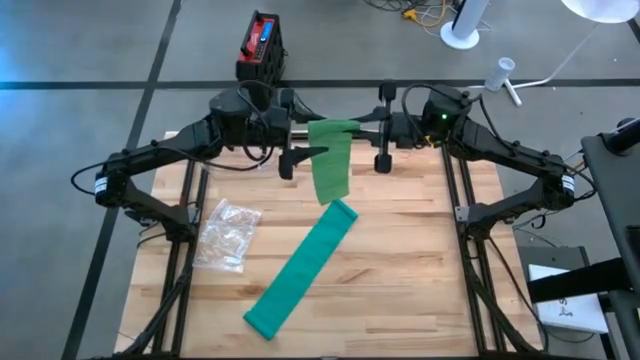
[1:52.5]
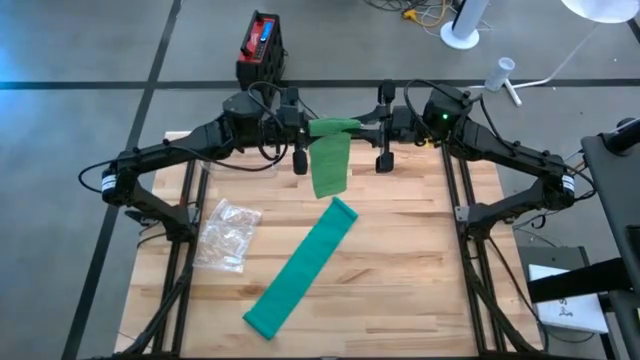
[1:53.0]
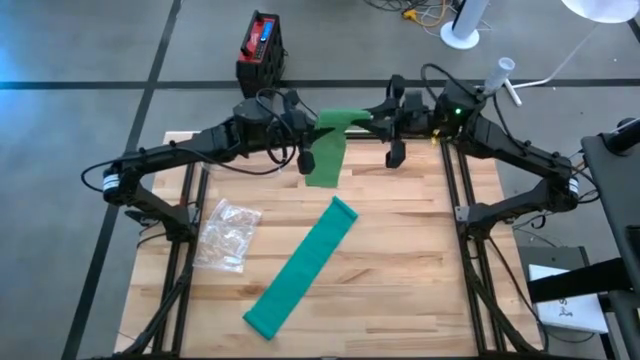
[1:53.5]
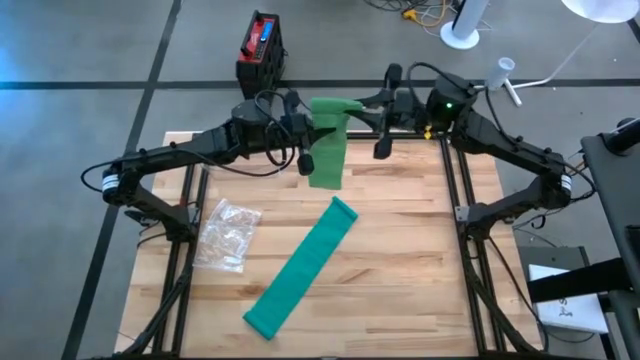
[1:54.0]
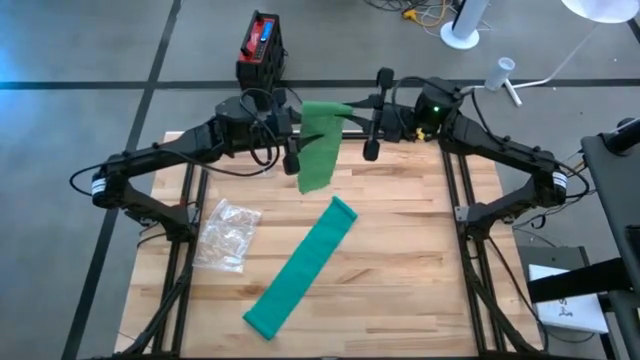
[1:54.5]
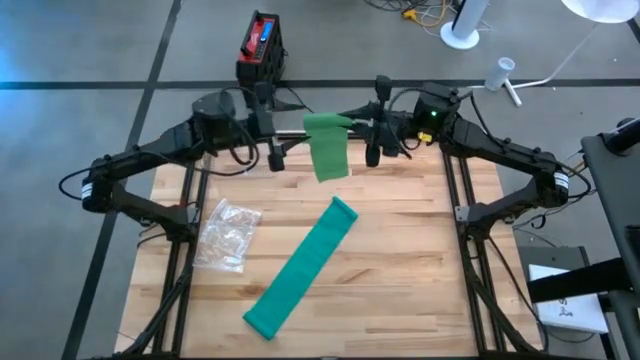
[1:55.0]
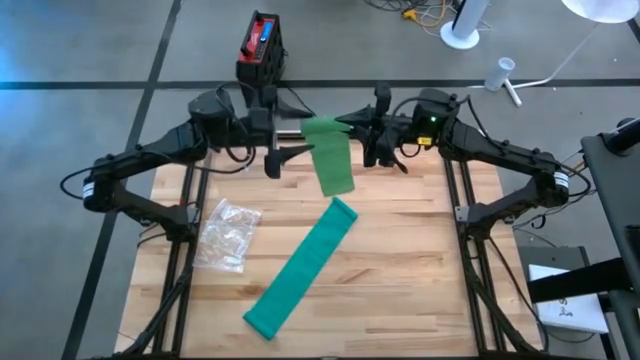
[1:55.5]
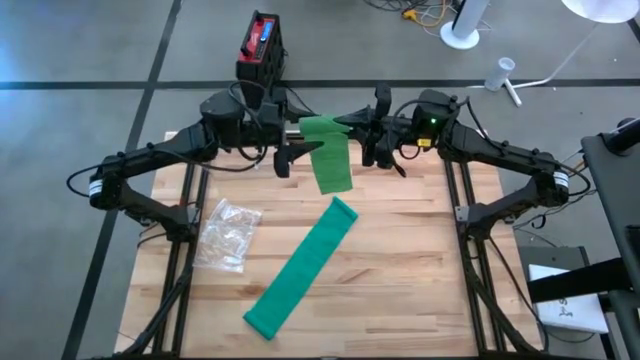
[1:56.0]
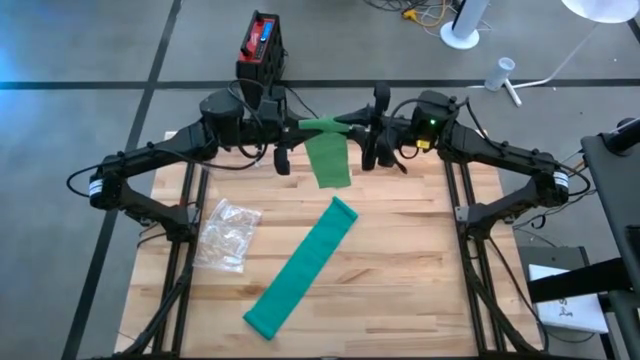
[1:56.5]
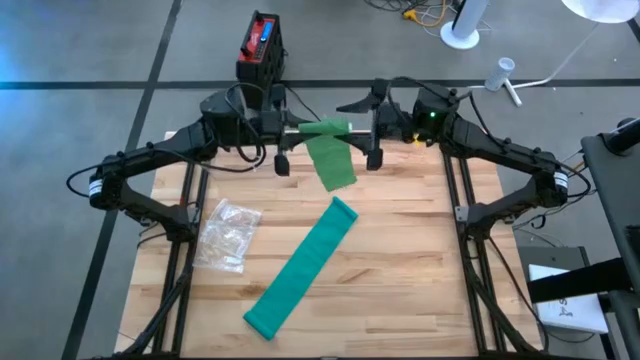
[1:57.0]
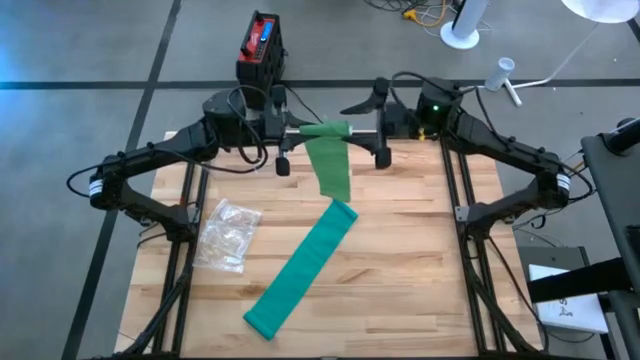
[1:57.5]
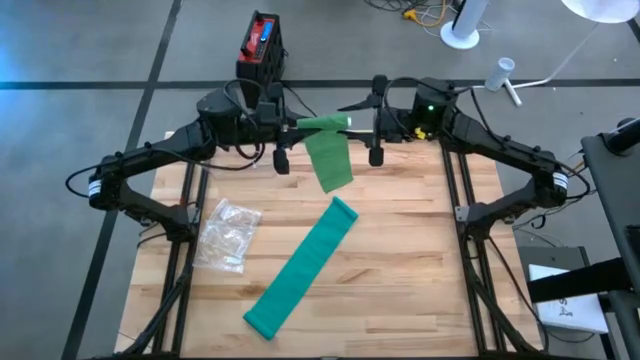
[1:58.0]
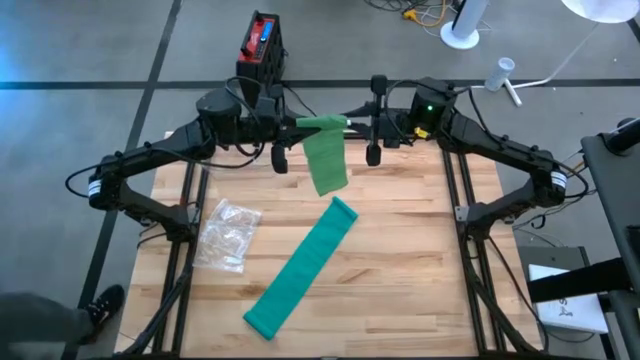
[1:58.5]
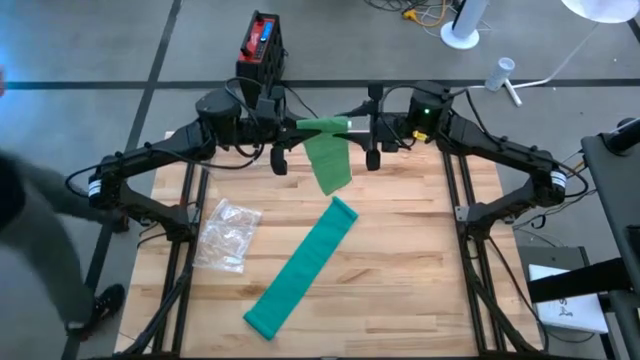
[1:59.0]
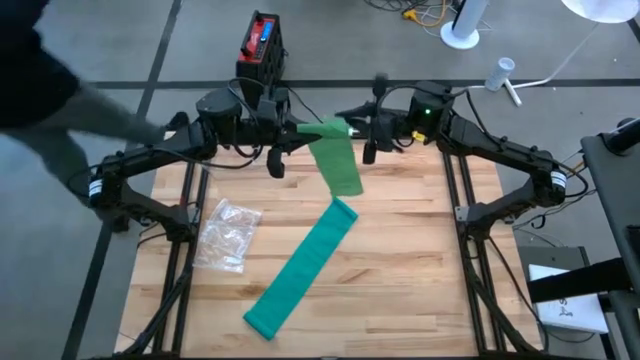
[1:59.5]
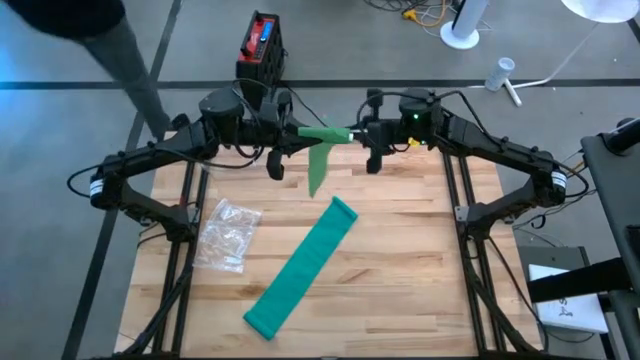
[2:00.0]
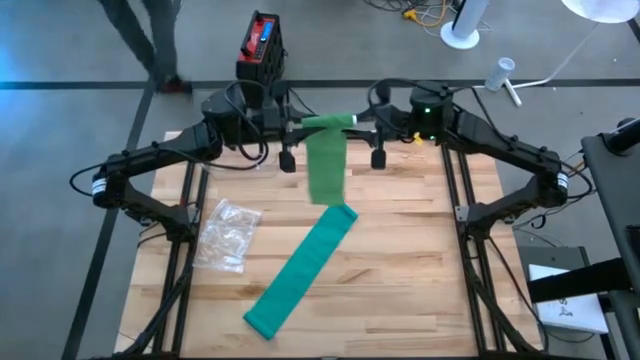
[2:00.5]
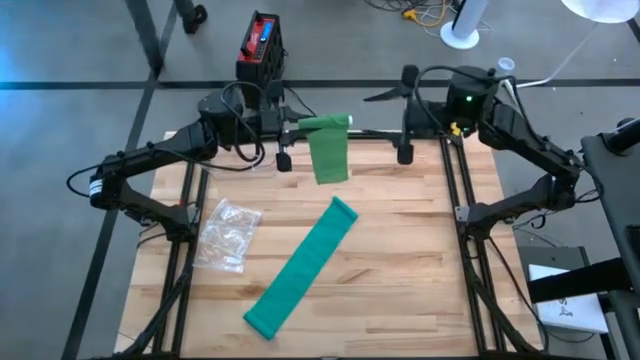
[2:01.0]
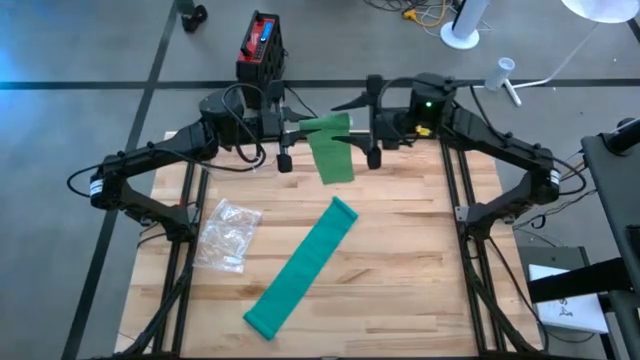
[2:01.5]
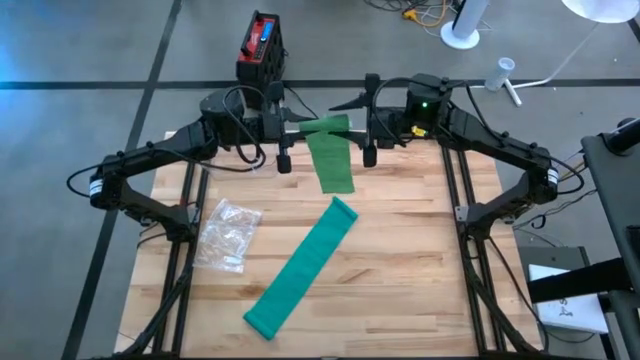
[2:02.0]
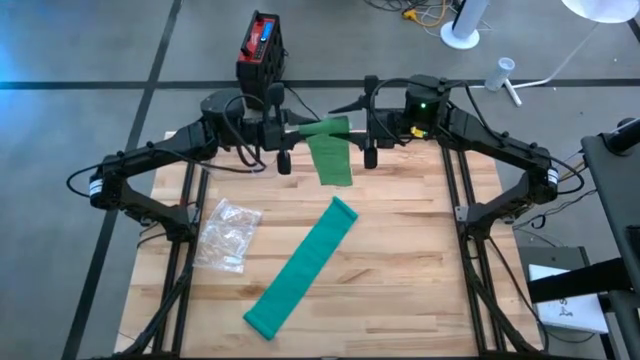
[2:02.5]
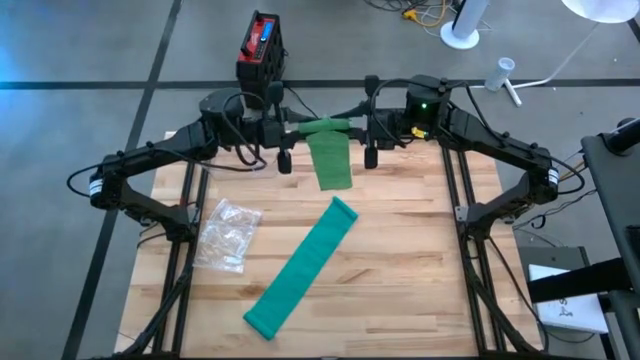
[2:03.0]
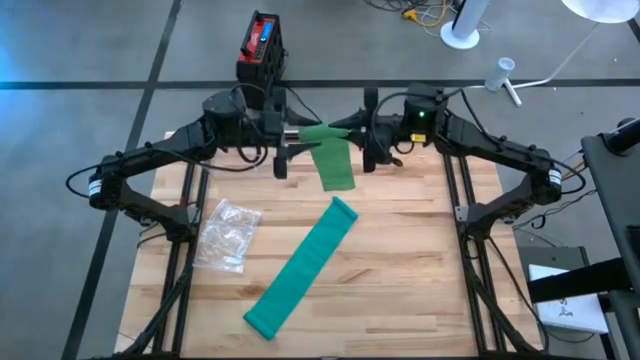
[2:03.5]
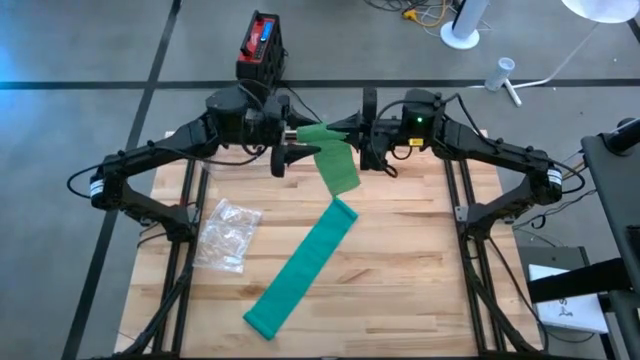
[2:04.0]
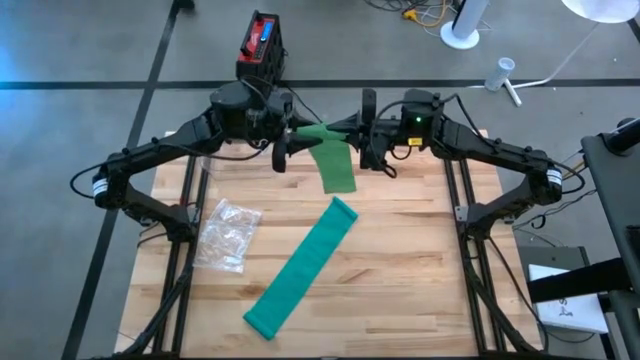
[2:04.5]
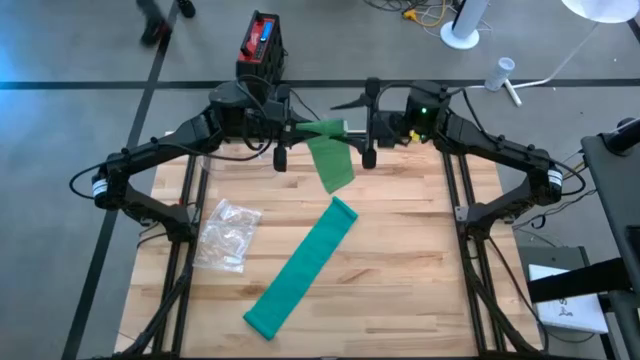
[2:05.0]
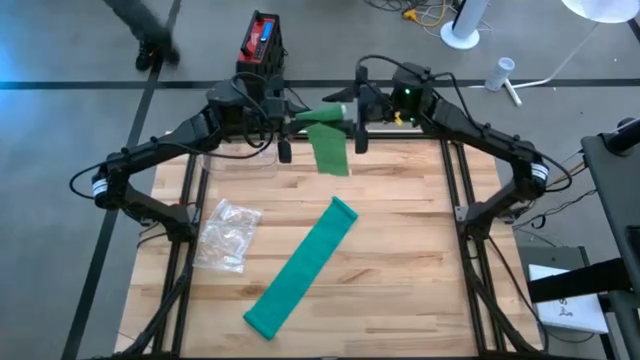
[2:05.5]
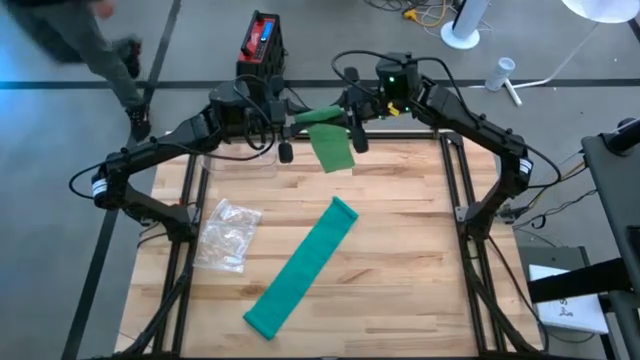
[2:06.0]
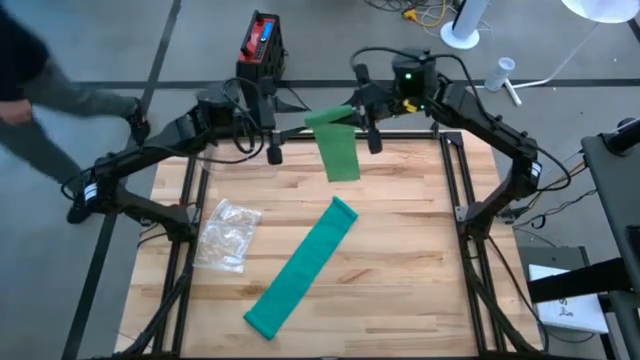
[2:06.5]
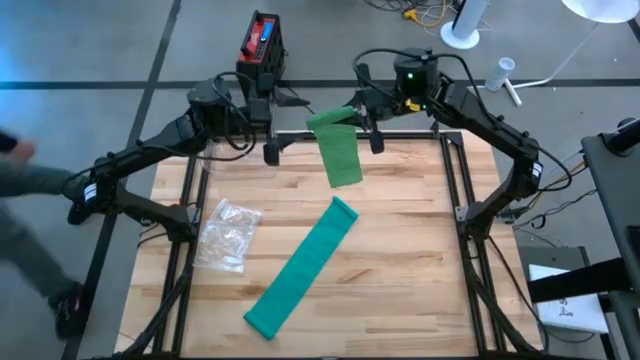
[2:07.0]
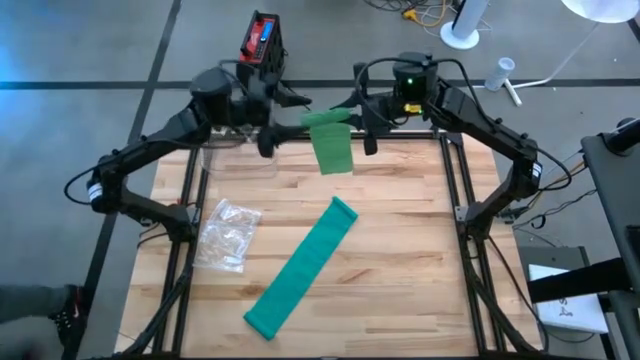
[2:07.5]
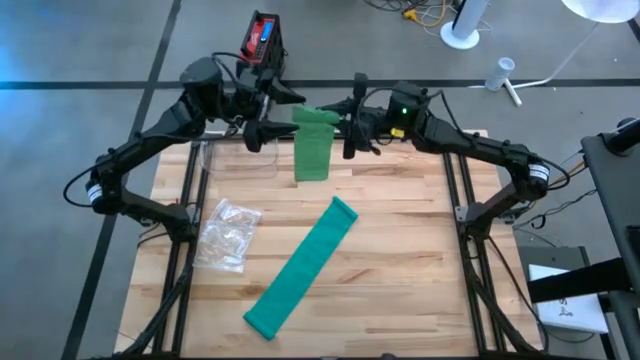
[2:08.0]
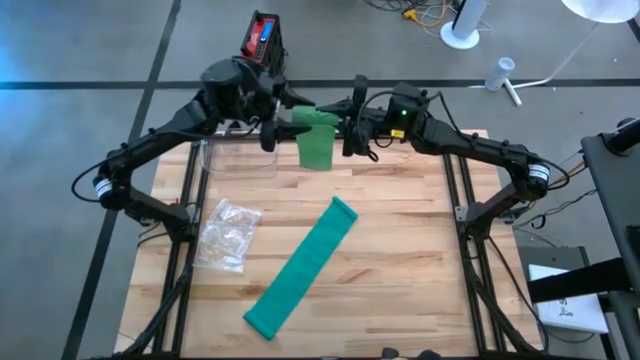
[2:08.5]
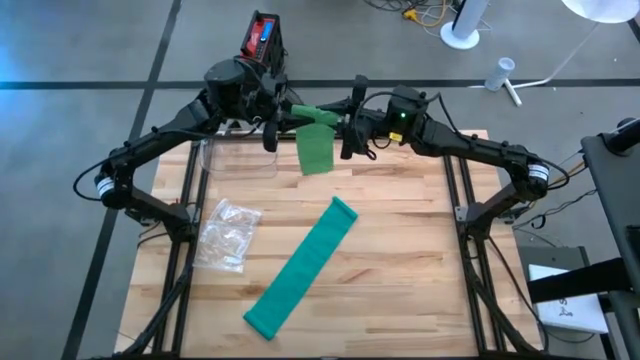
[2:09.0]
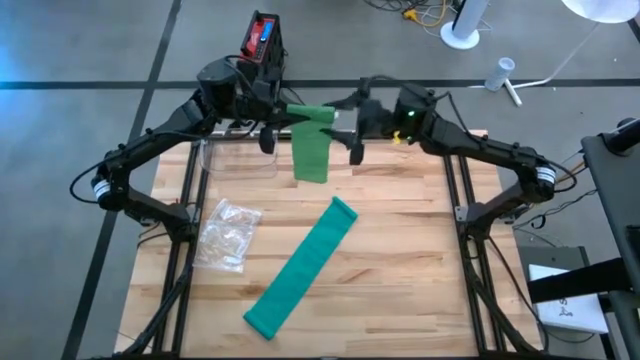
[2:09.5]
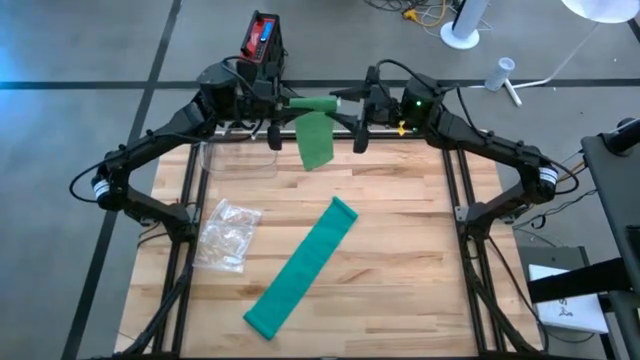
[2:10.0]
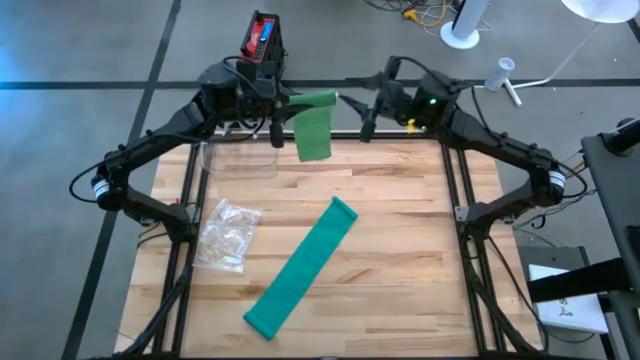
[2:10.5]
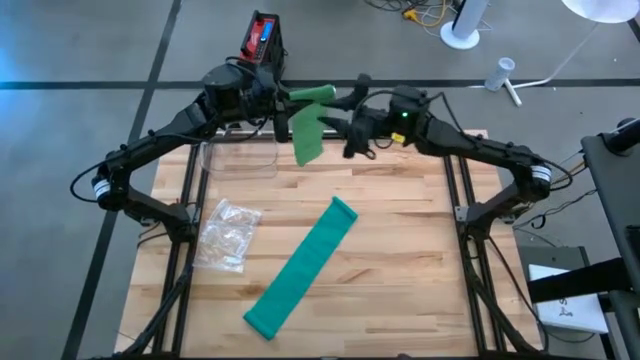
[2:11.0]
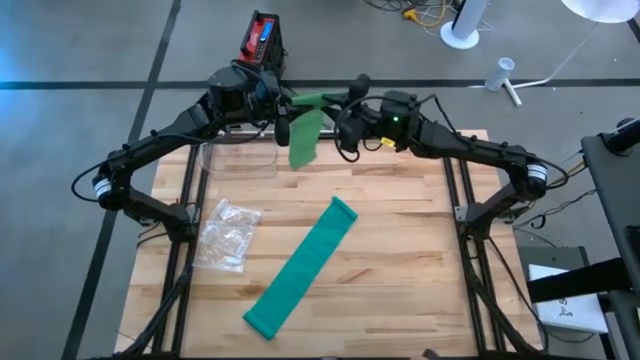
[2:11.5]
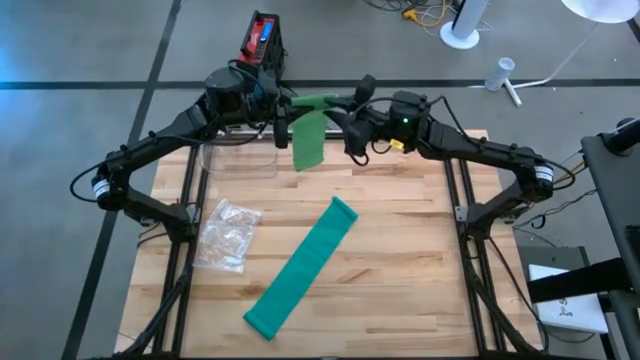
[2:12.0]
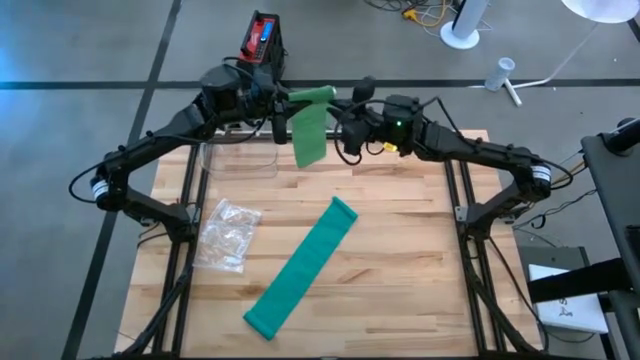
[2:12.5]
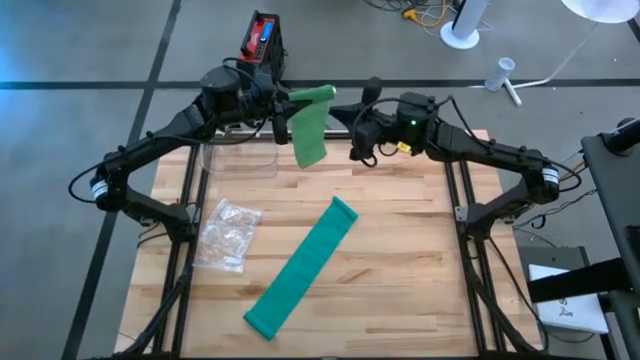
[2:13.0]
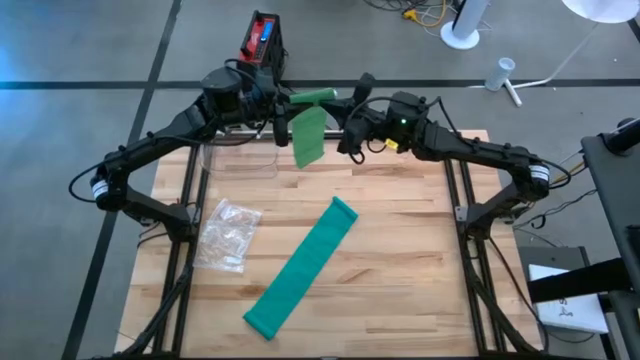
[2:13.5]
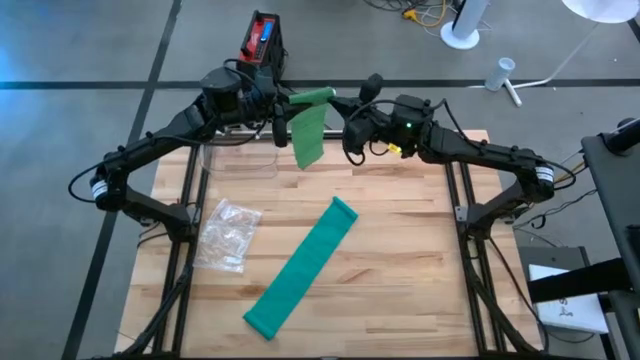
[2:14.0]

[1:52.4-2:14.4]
Task: Roll bandage
Roll the green bandage
